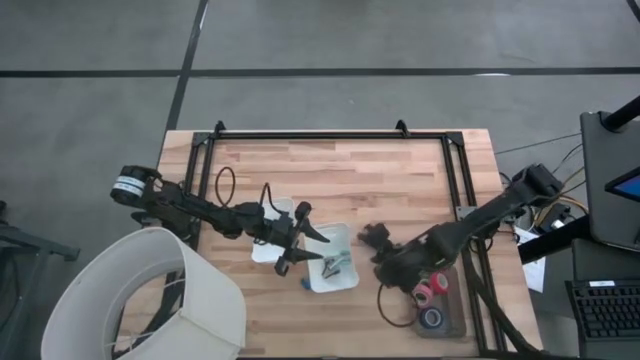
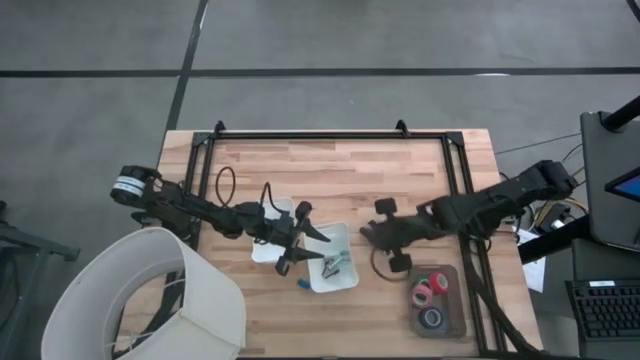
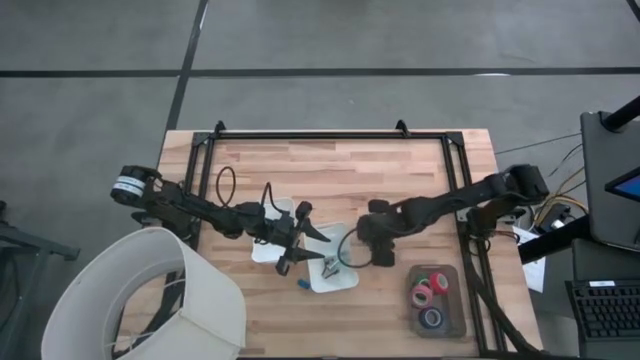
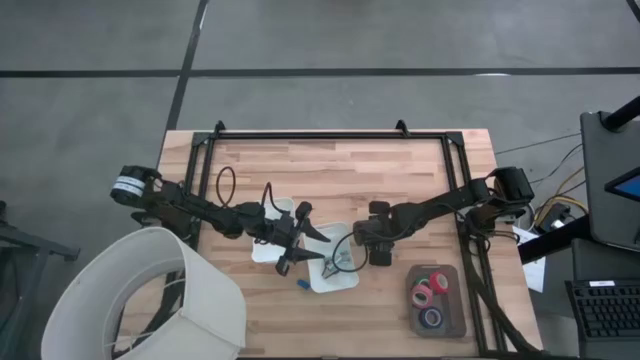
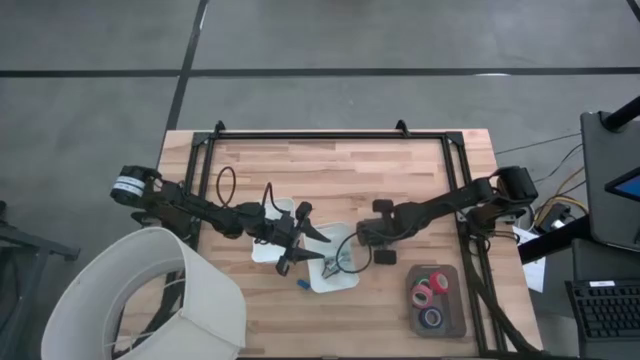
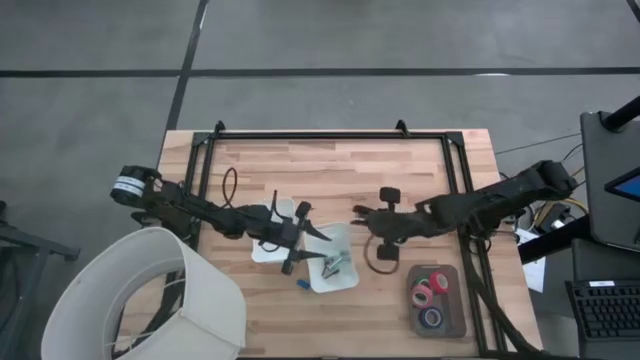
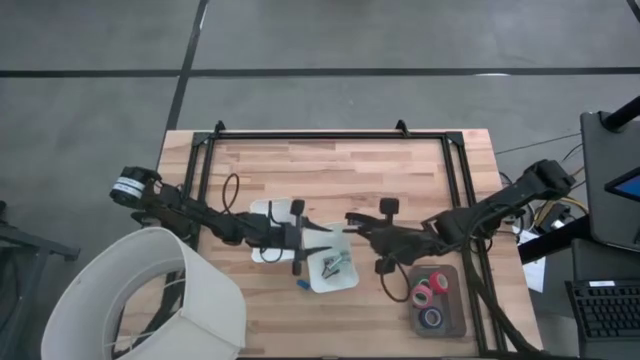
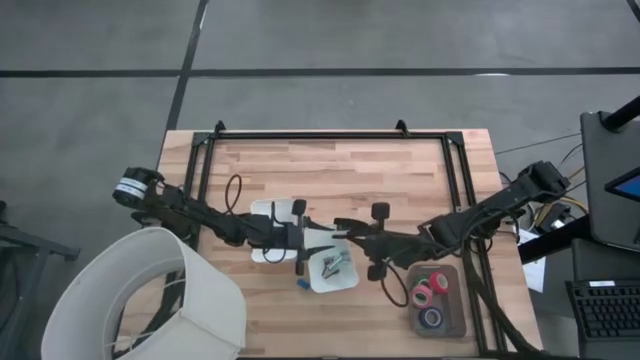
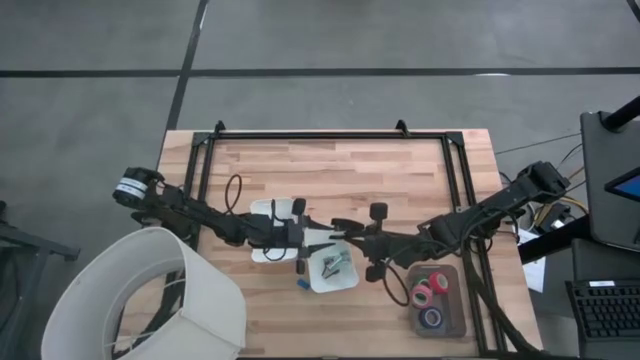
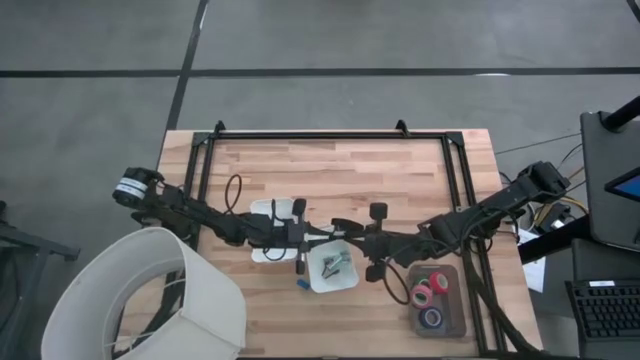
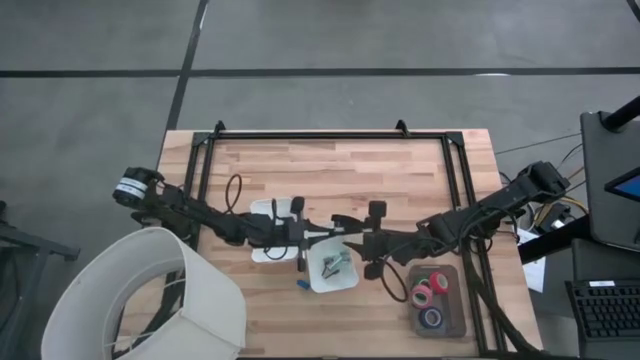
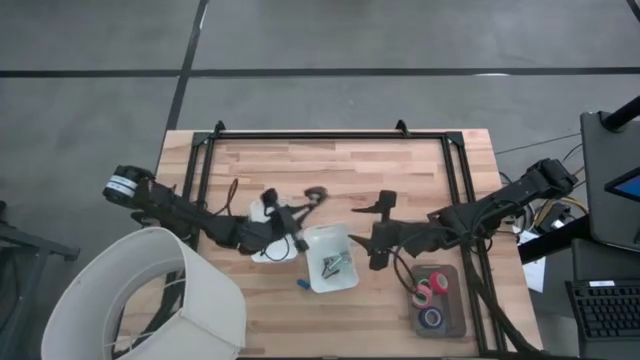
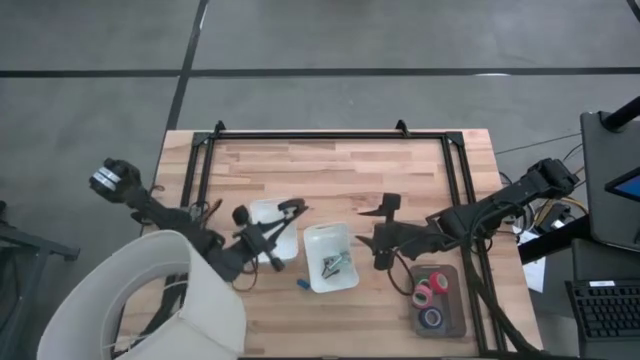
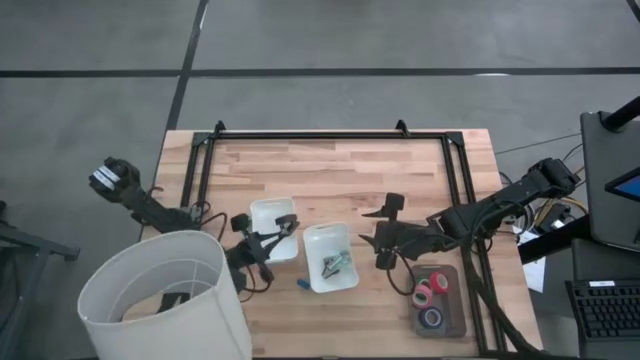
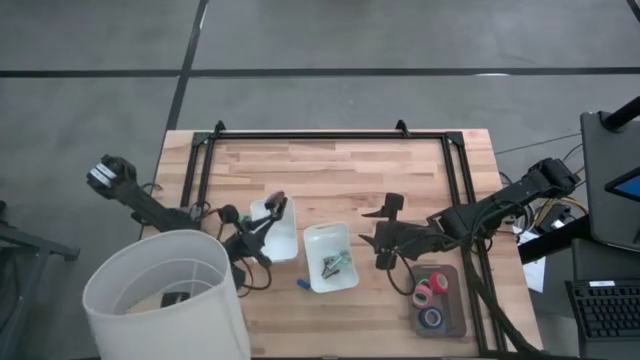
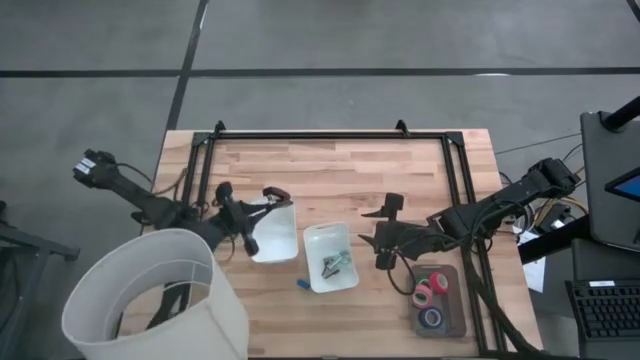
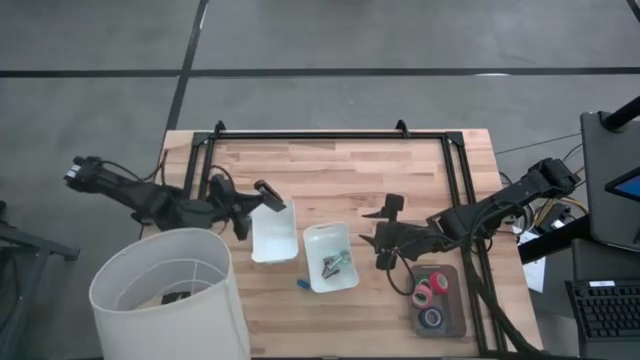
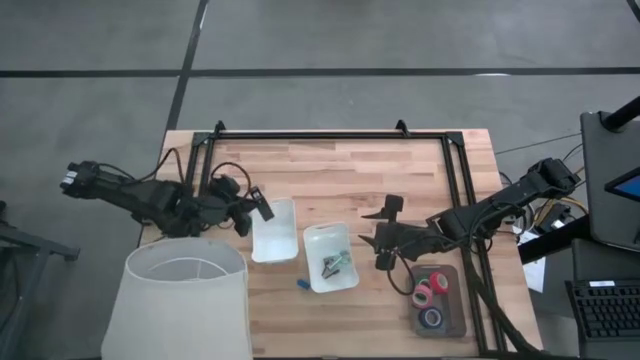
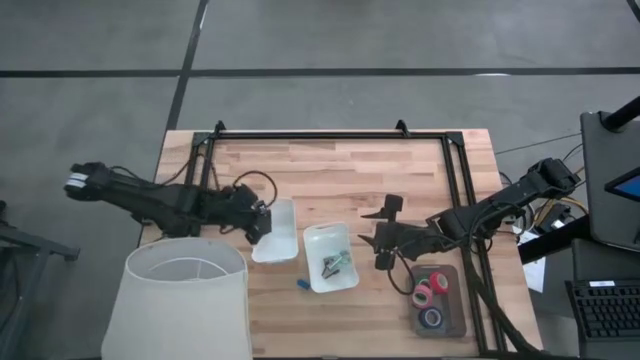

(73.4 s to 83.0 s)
Task: Pick and place Stapler, Stapler remover, tape
Put the black stapler into the left white bin

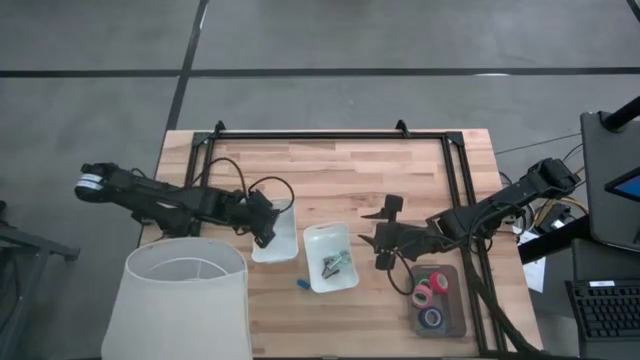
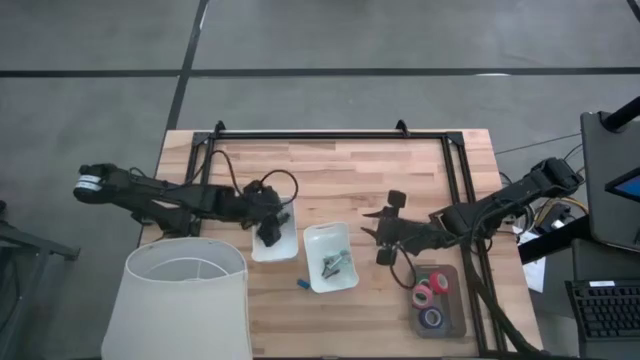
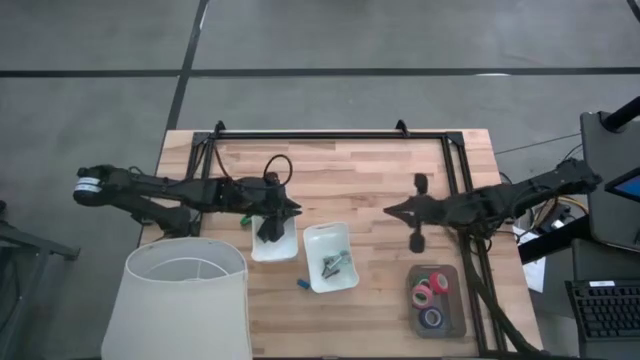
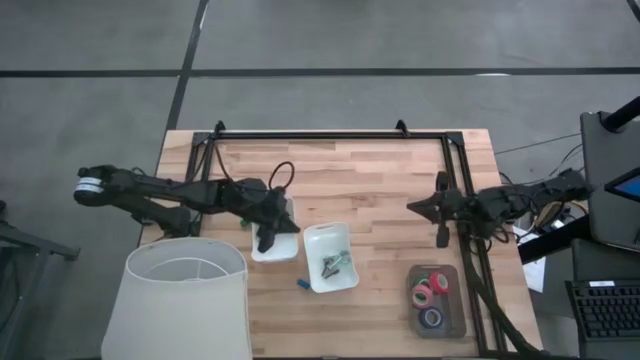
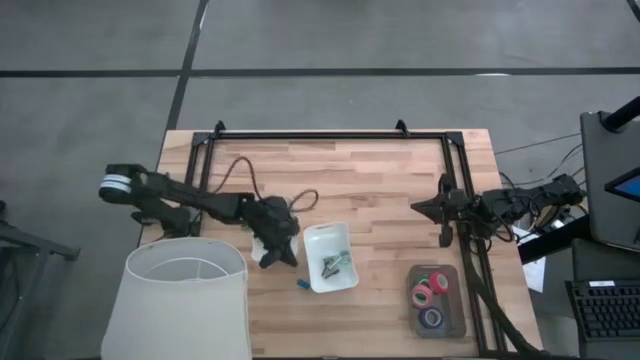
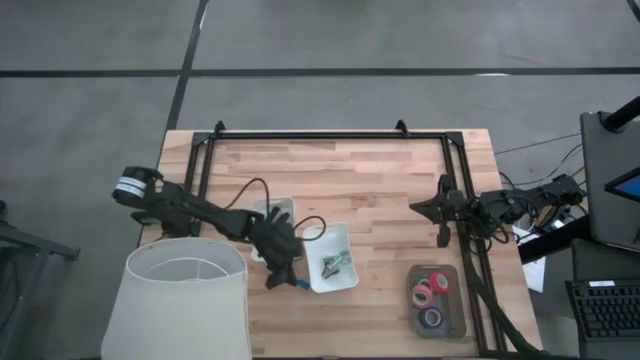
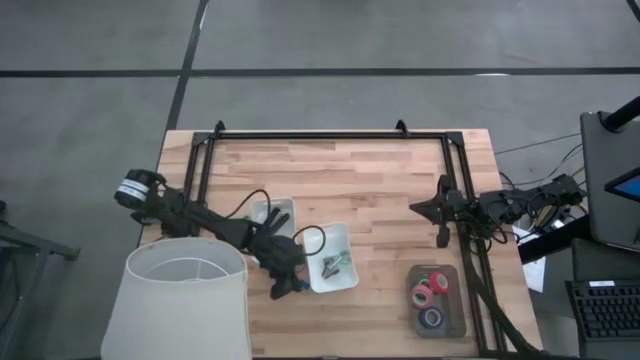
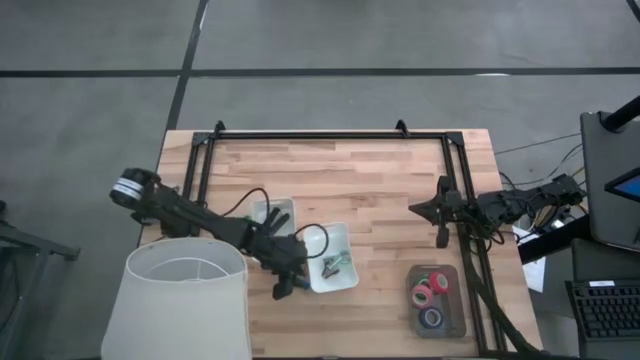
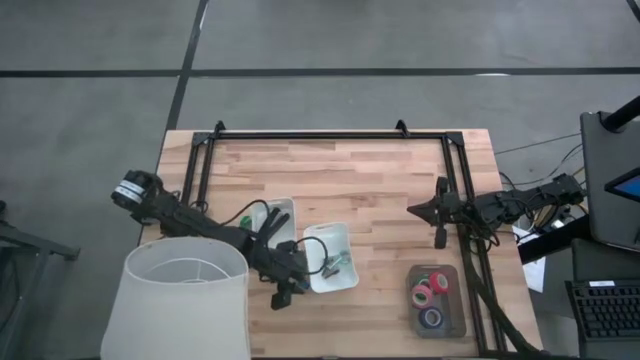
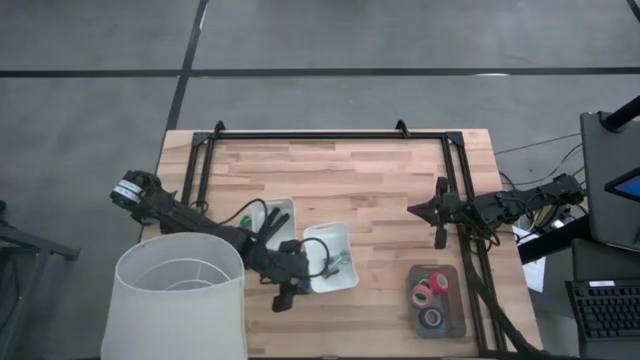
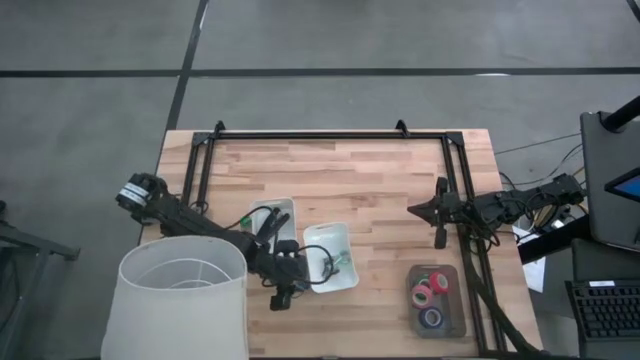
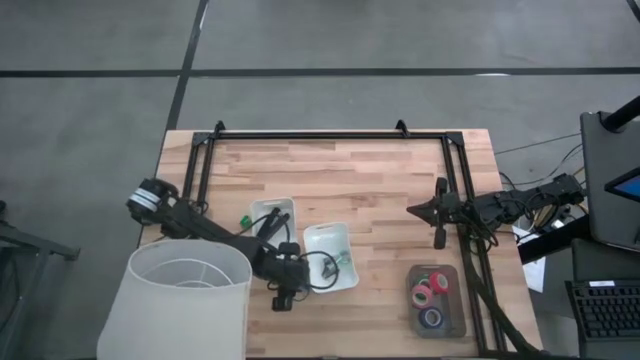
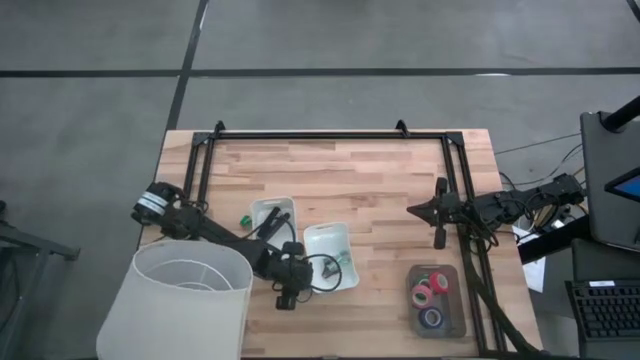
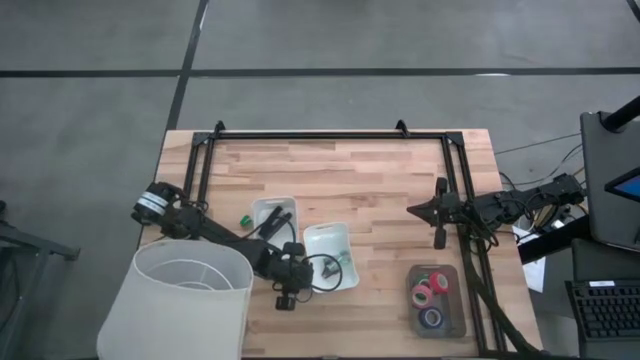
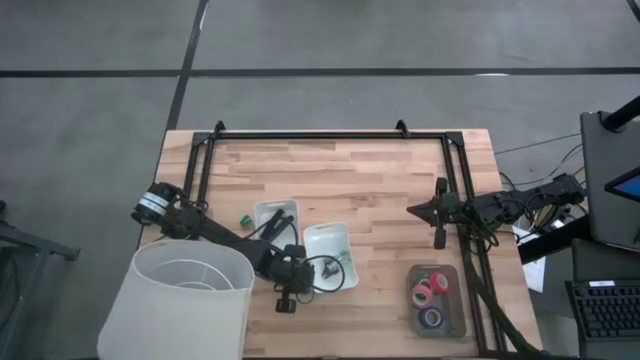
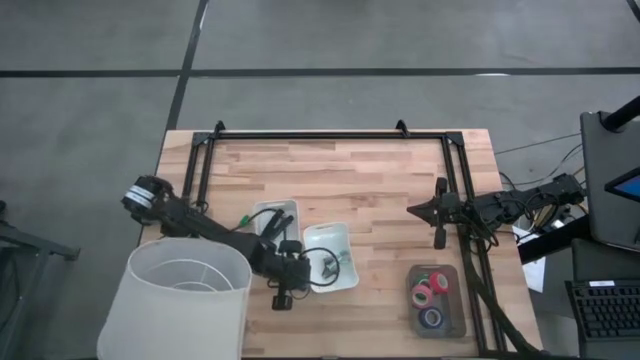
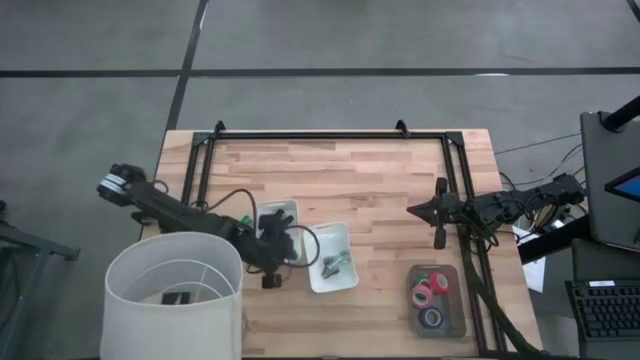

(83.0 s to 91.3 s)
Put the blue stapler into the left white bin

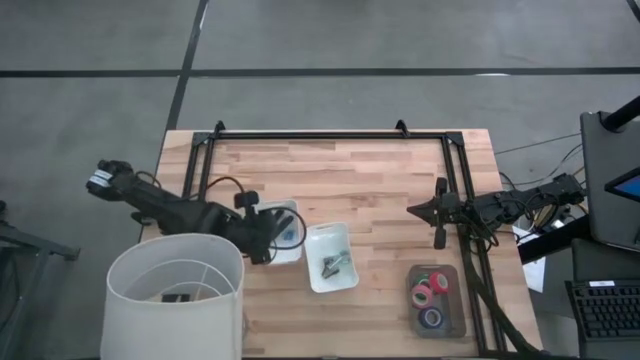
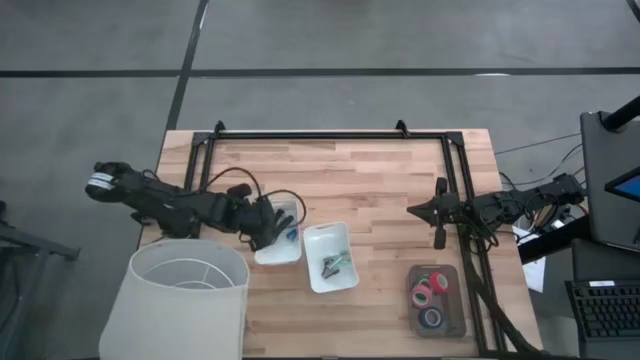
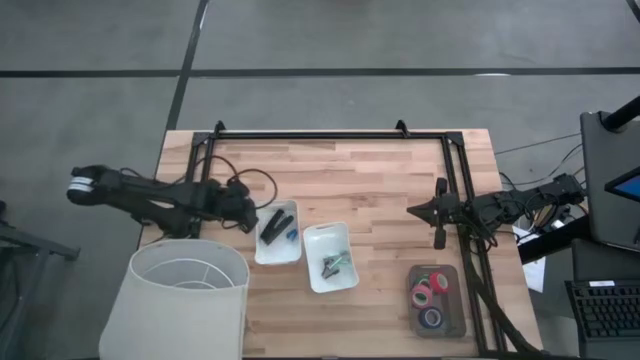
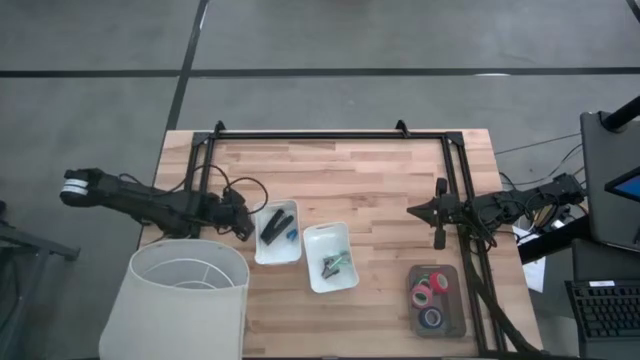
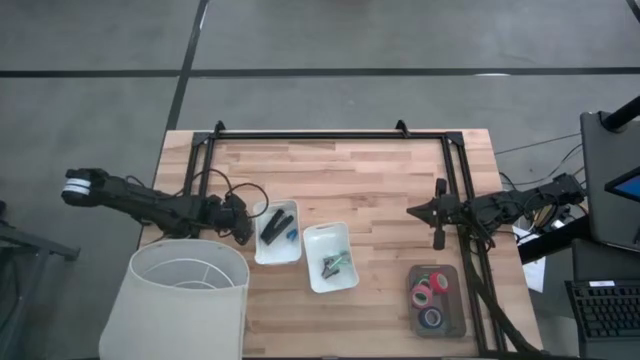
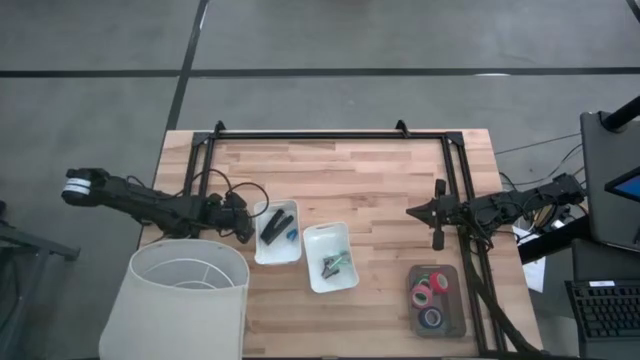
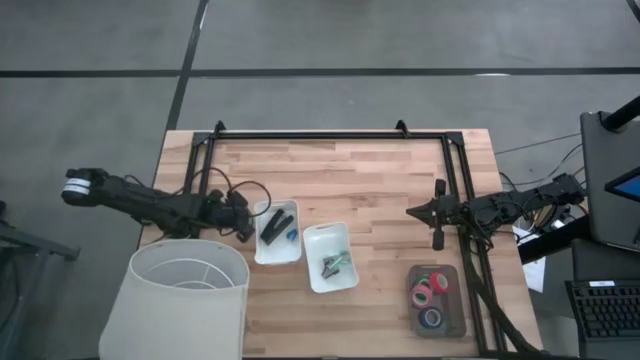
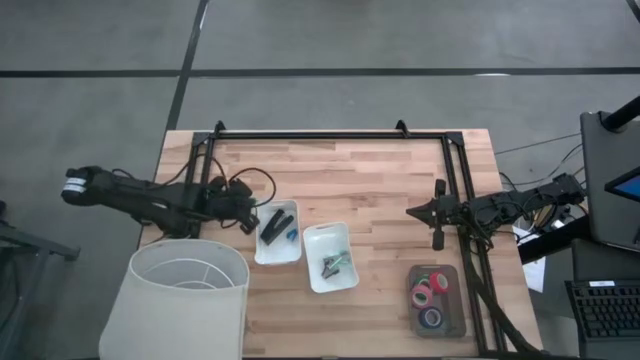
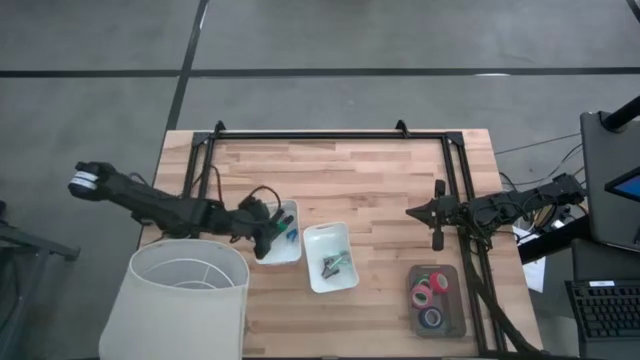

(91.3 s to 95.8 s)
Put the green stapler into the left white bin

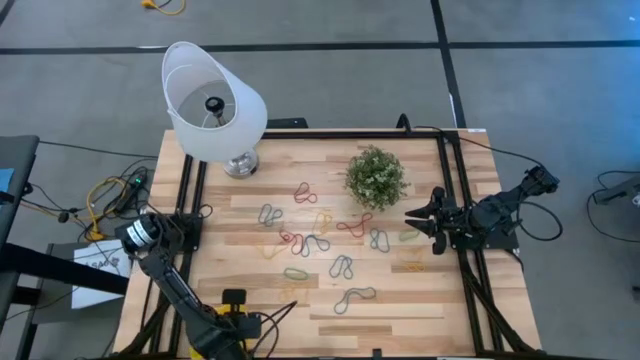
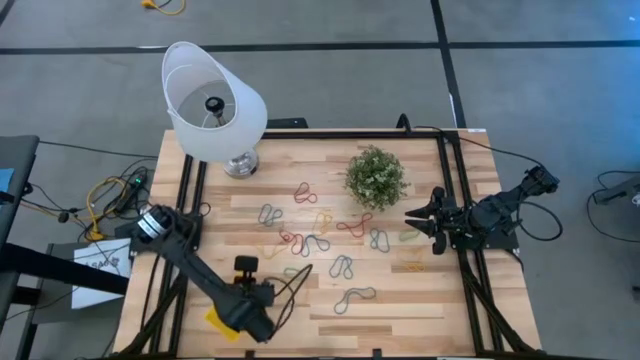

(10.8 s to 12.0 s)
Task: Pick and place items into bin
Adjust the yellow bin
